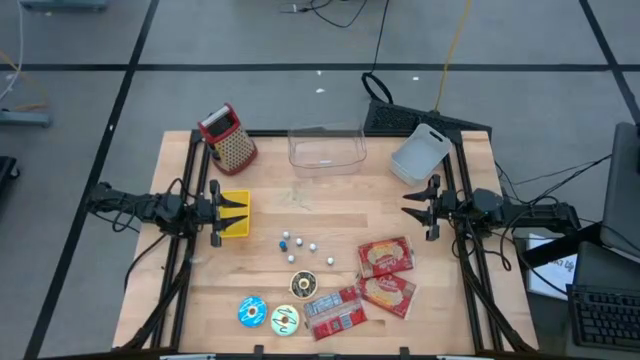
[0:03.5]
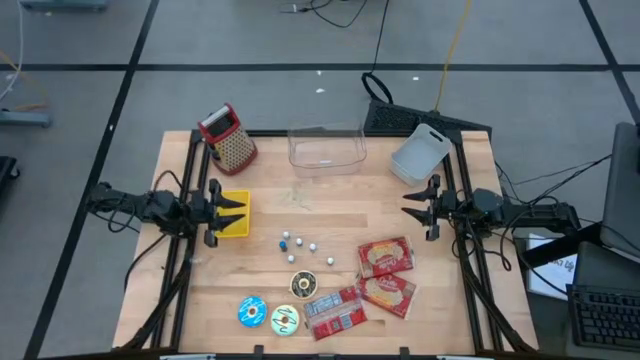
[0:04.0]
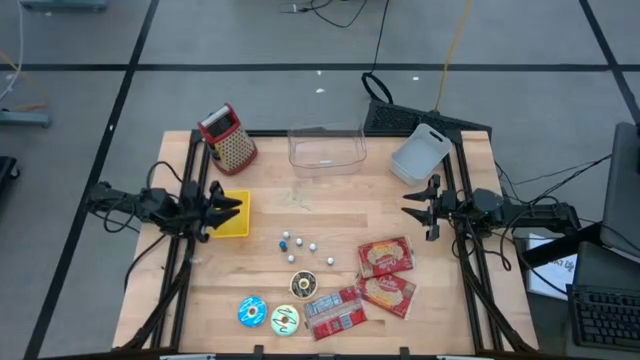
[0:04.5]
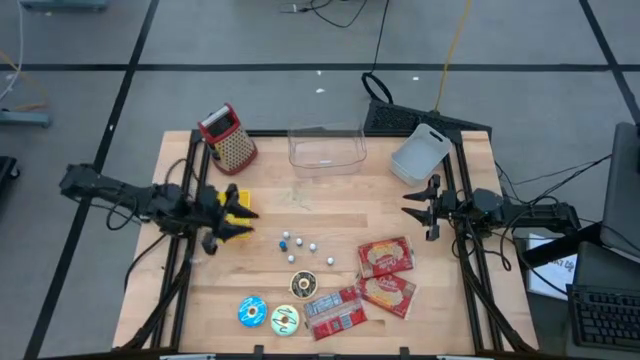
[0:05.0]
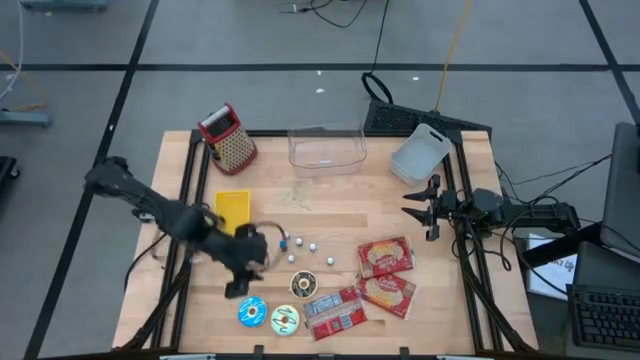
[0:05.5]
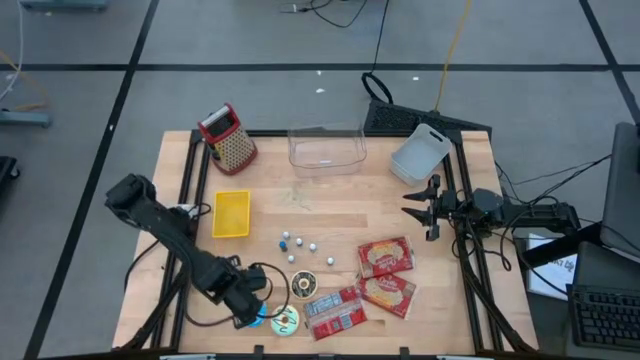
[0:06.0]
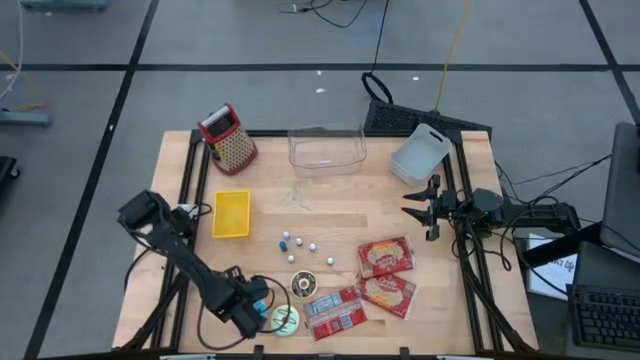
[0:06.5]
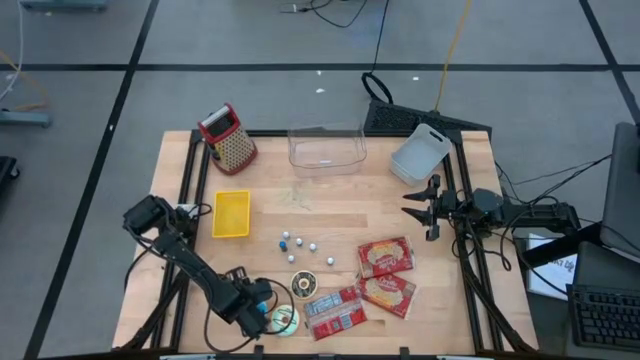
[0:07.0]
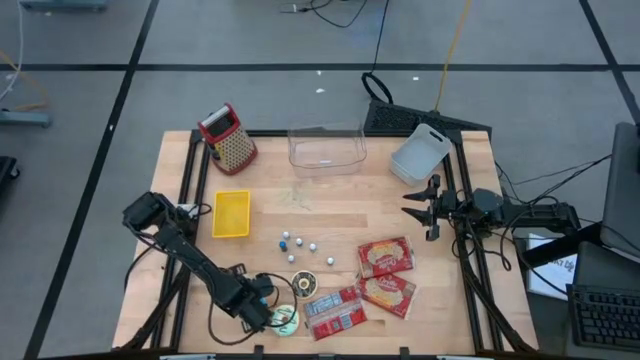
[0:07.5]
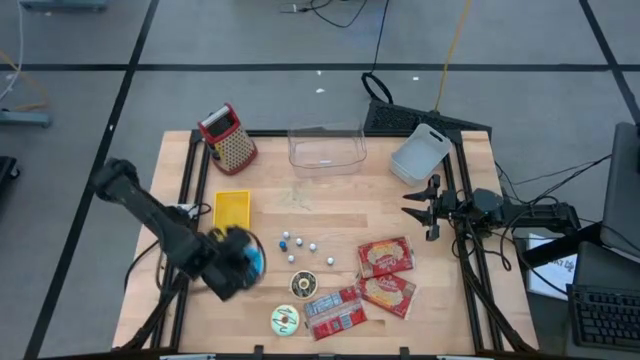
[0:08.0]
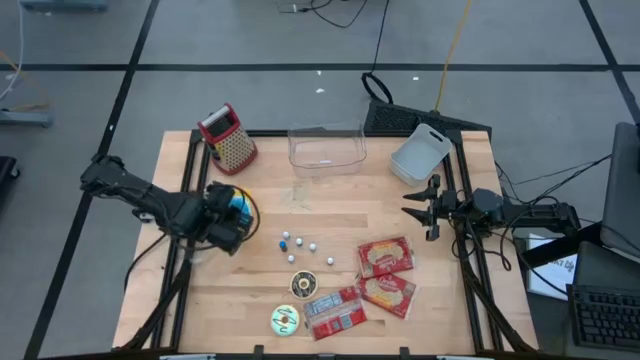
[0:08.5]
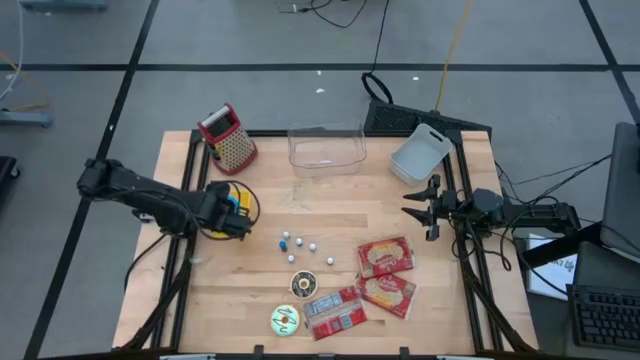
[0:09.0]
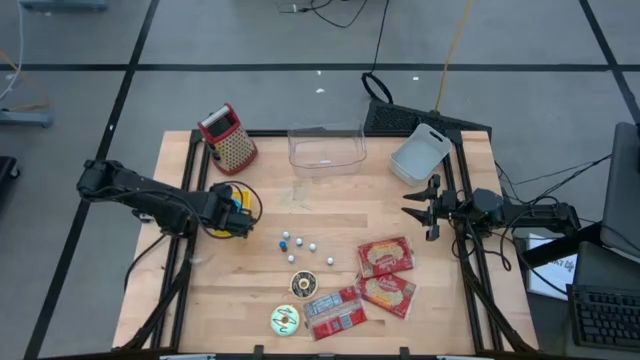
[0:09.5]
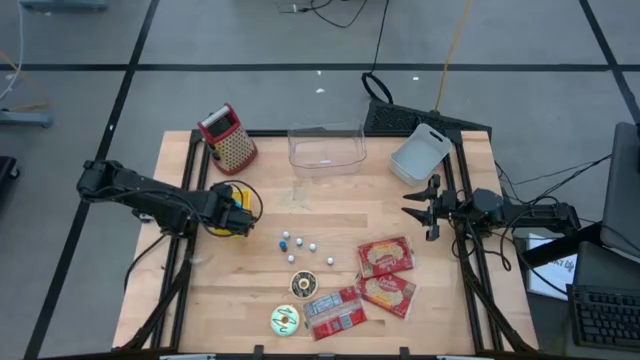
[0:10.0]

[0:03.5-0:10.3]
Put the blue donut into the yellow bin

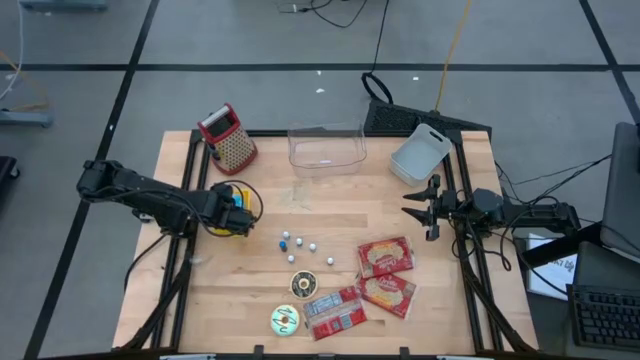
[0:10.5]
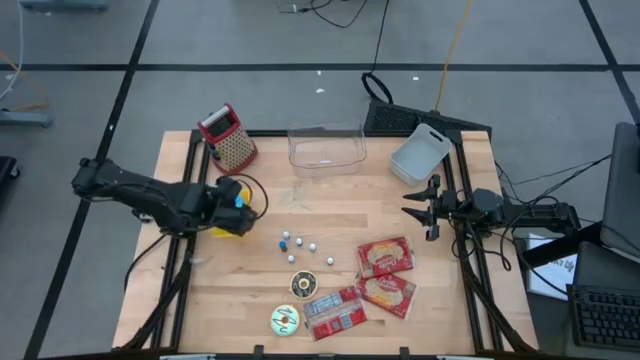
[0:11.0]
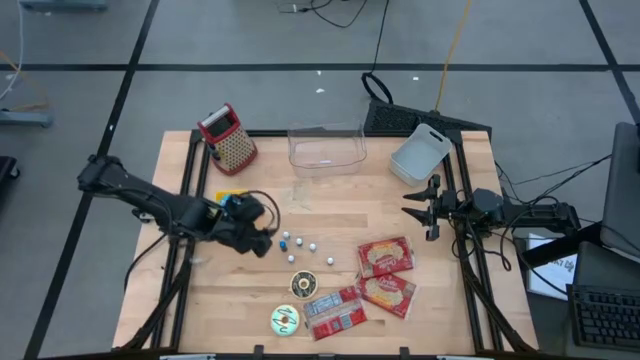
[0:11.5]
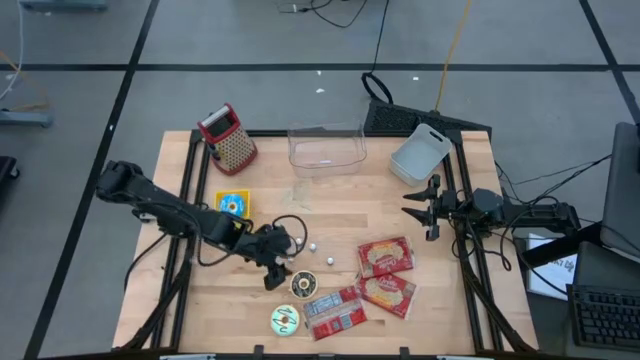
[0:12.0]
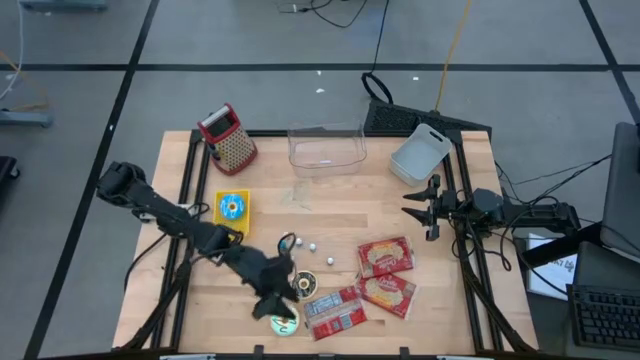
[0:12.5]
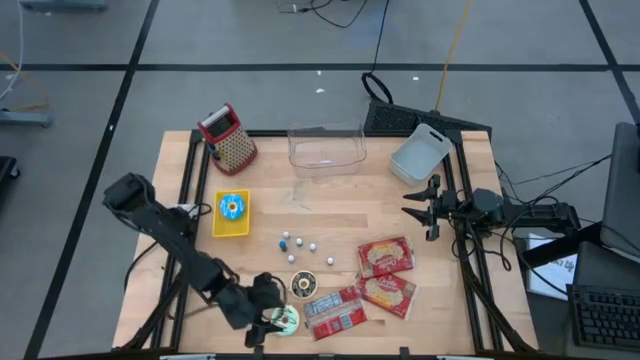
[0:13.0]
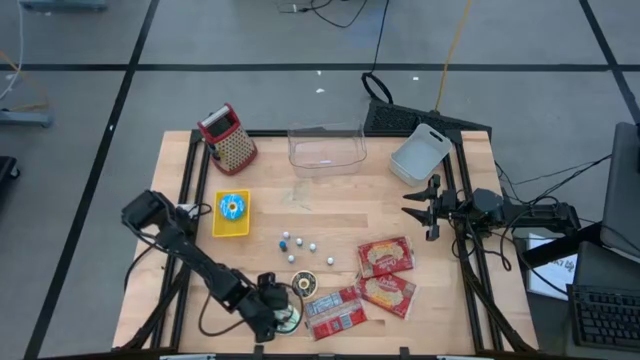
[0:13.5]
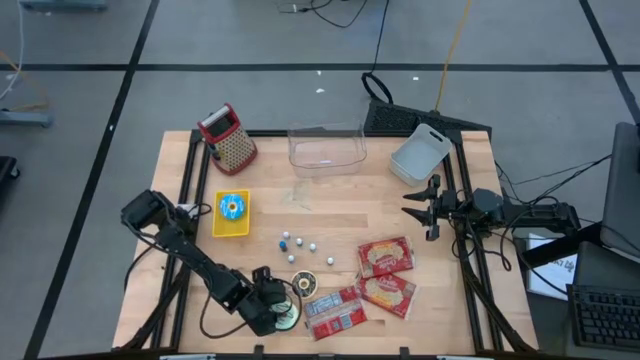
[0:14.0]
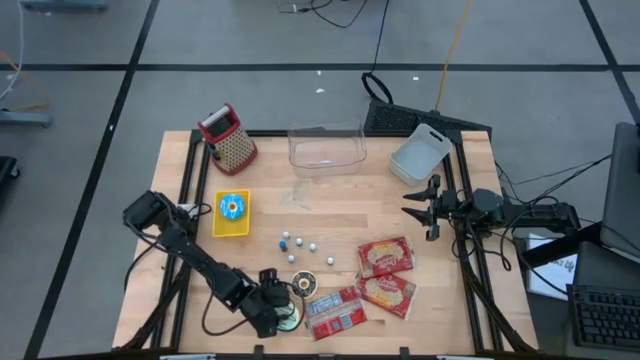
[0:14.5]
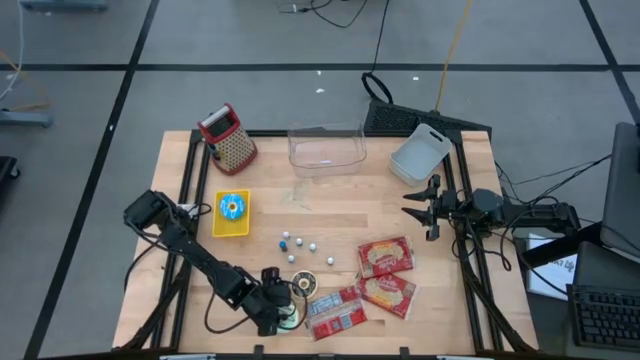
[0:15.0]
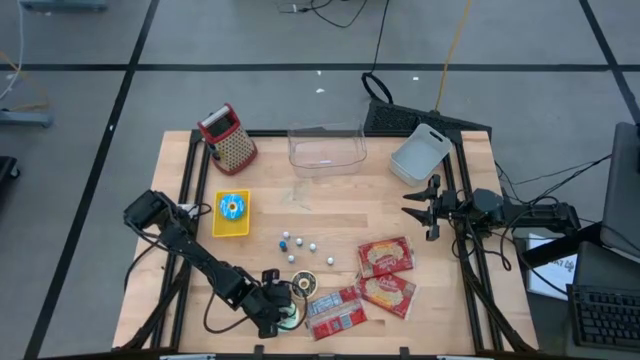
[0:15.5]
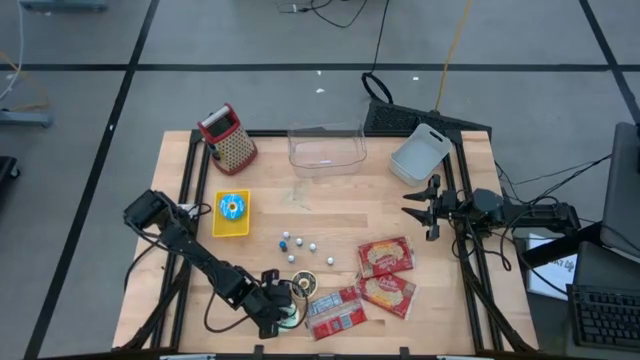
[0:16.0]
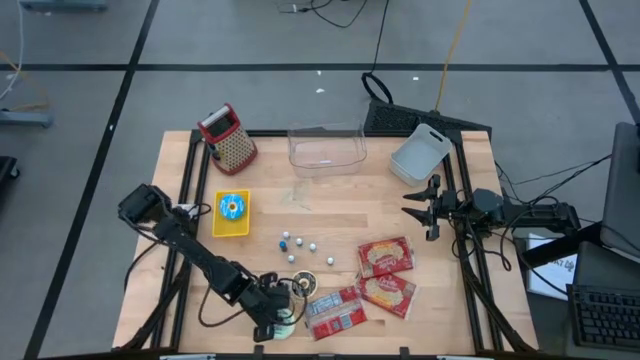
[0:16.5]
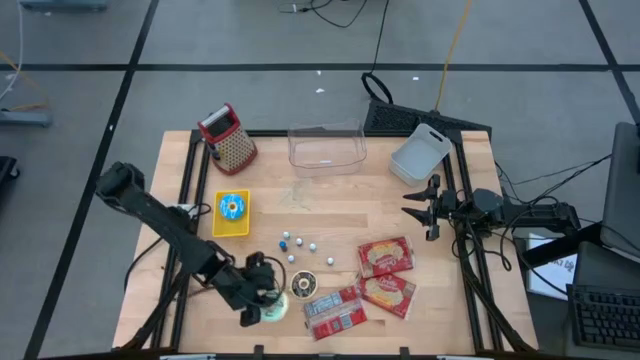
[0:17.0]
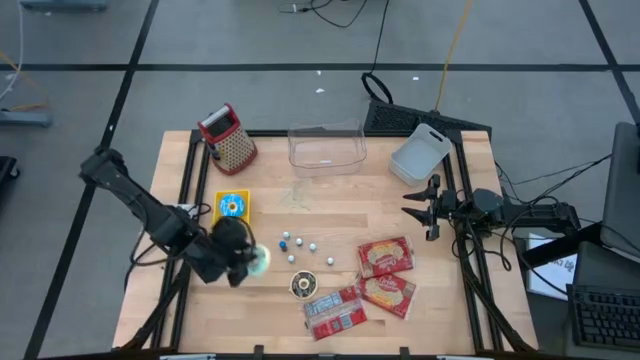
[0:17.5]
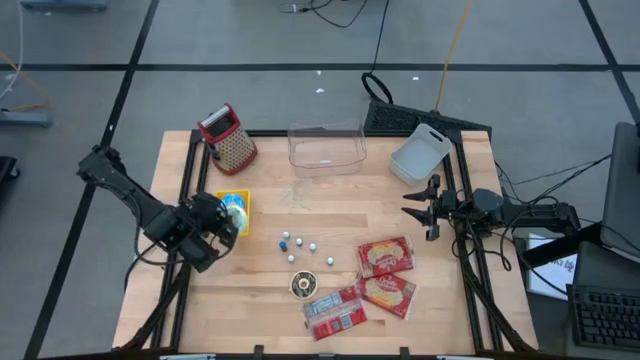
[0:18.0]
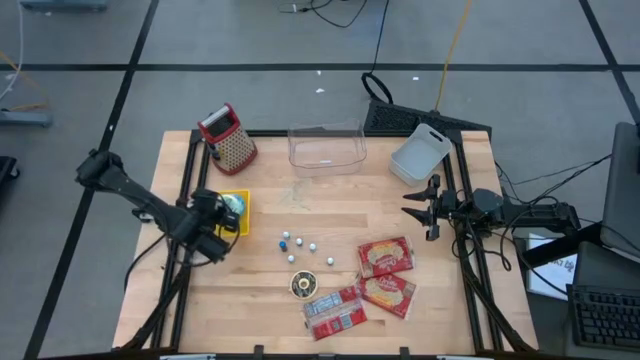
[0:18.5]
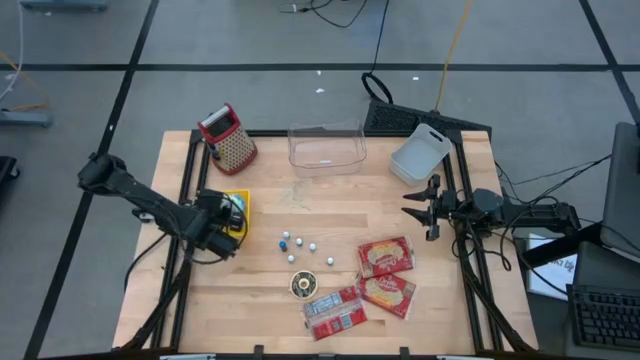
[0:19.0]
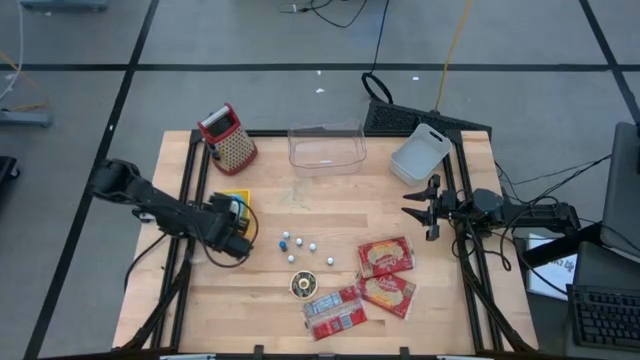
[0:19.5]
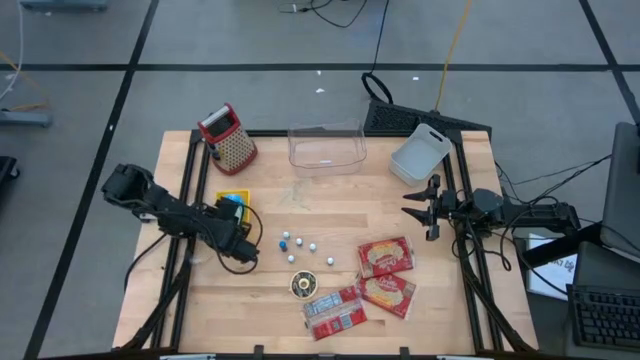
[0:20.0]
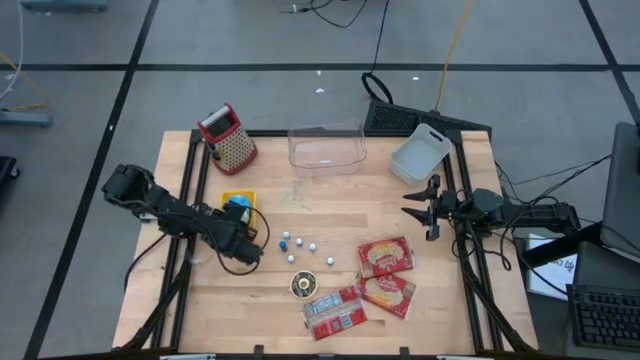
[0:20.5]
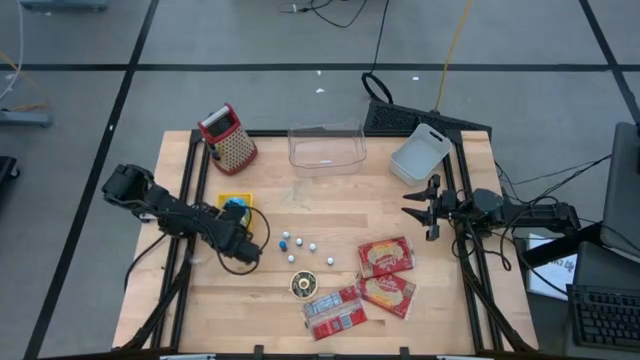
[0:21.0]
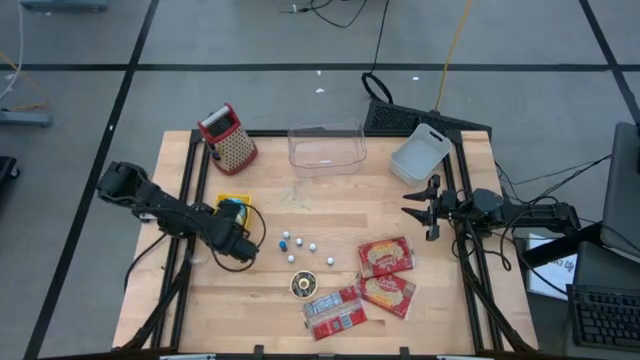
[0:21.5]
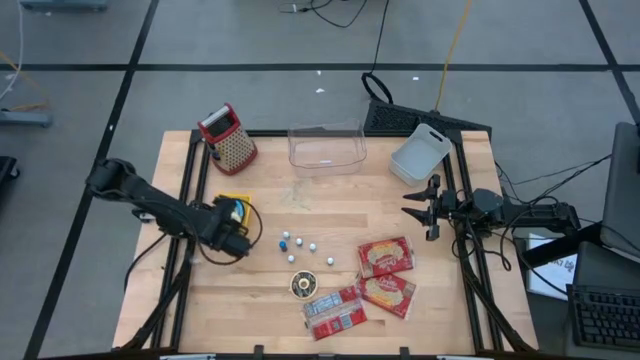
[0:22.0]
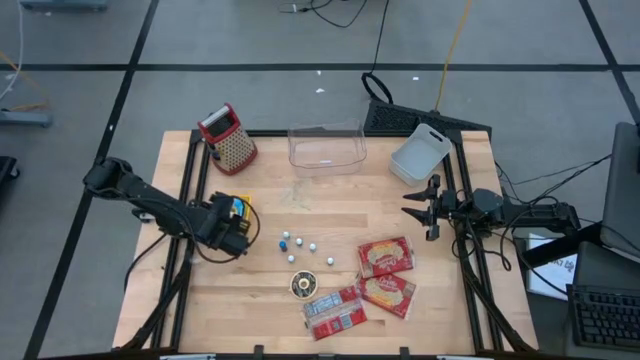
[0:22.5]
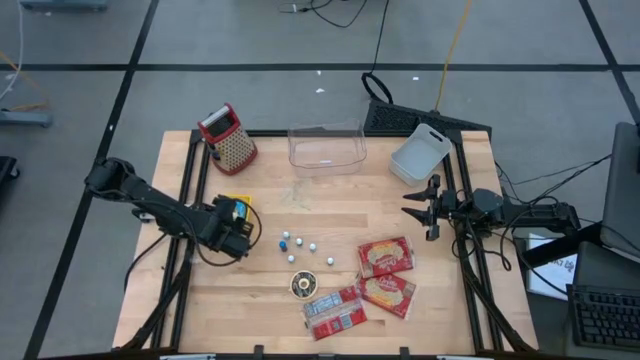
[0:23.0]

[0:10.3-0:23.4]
Put the light blue donut into the yellow bin
